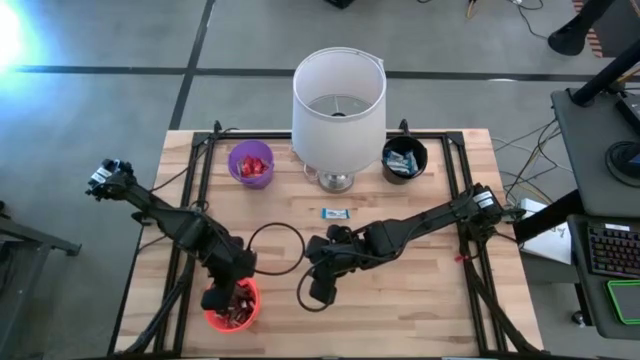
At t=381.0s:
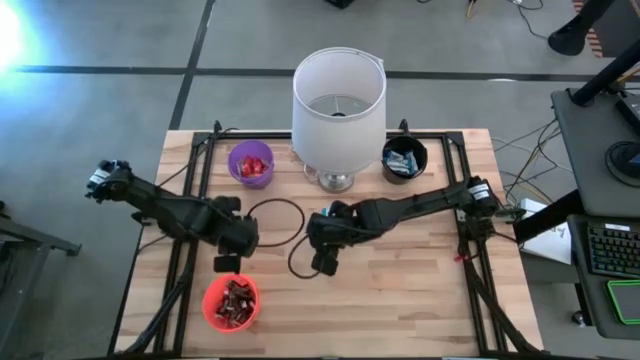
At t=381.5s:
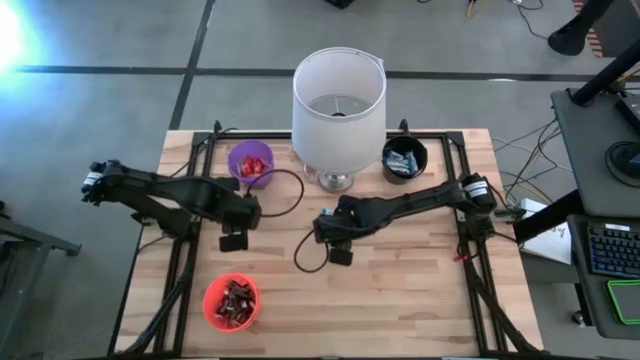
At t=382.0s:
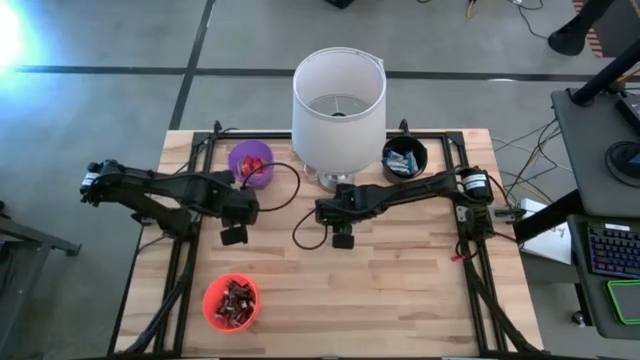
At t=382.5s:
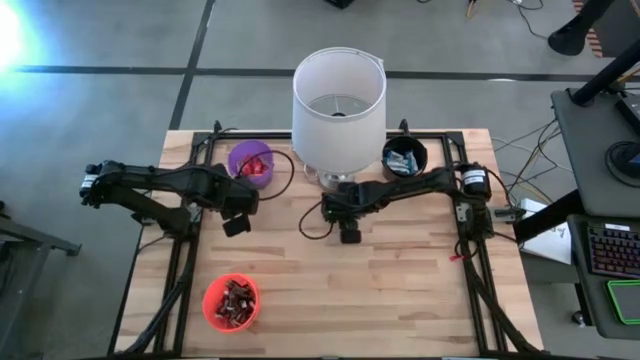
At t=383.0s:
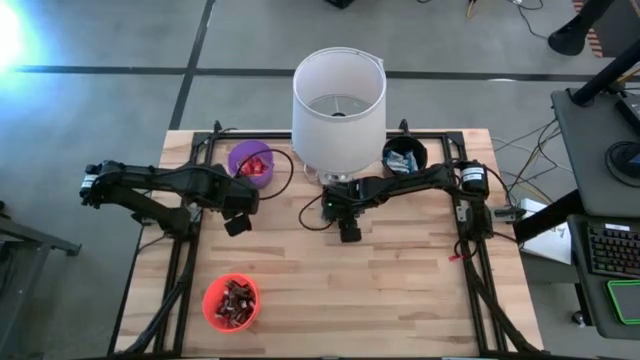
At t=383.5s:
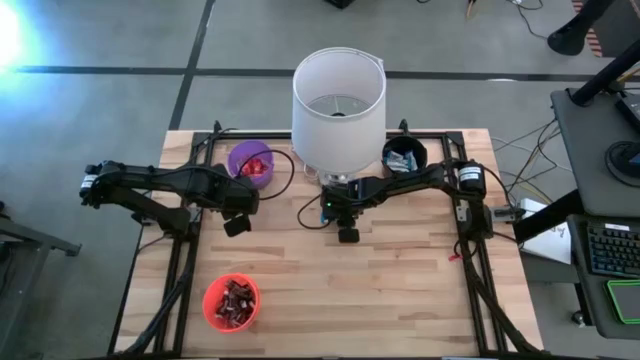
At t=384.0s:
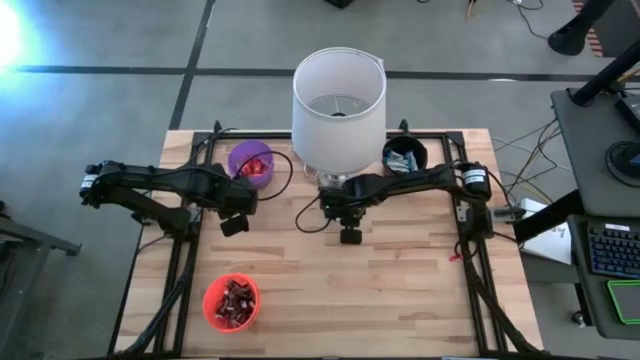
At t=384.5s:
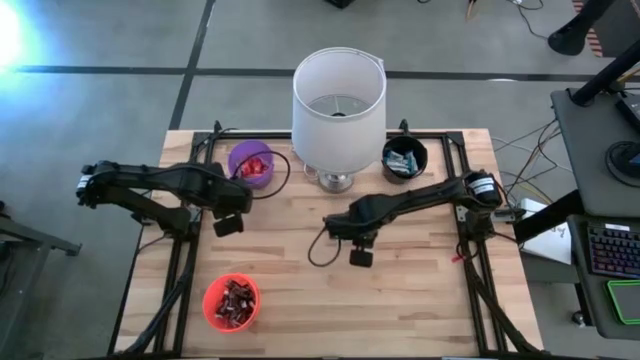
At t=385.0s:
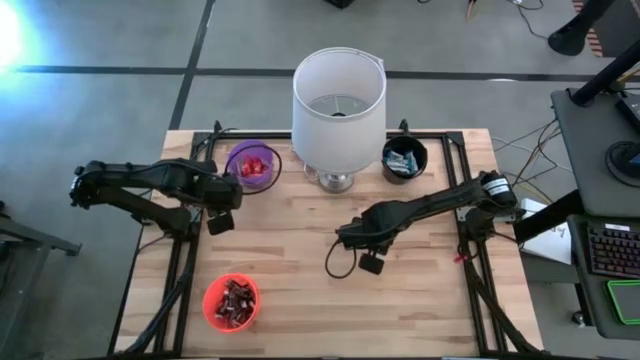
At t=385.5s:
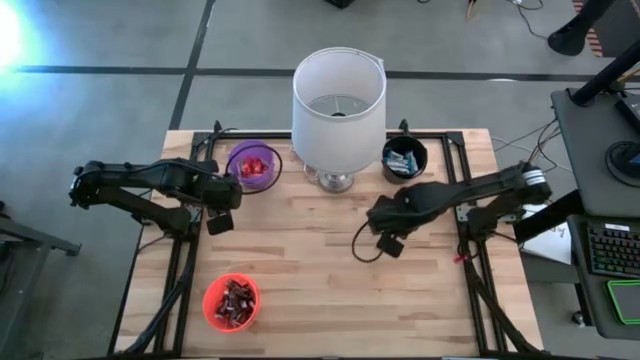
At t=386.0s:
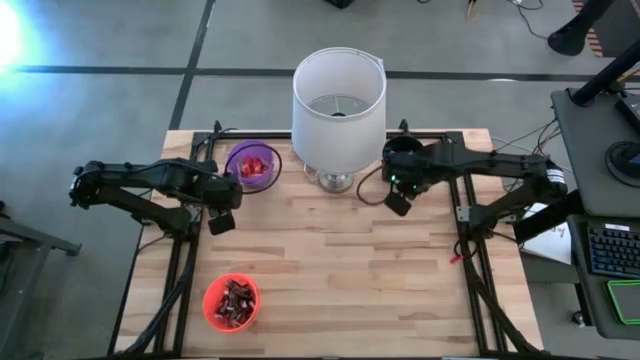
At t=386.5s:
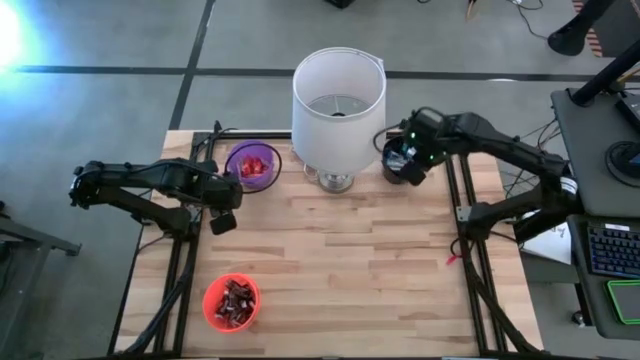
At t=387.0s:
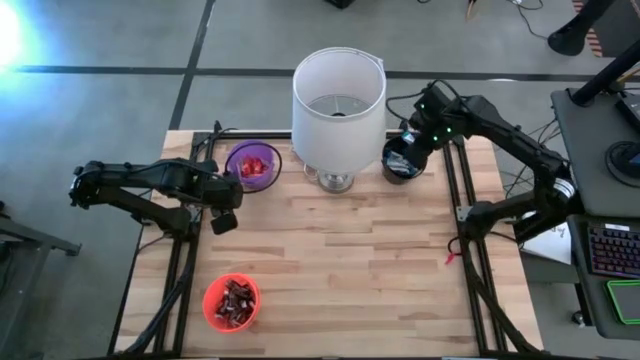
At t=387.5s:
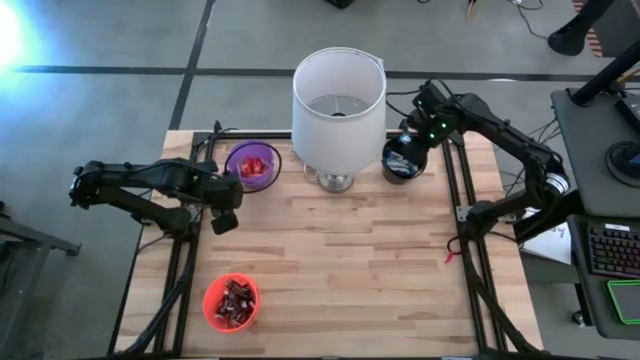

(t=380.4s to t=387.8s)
Task: Sort candy
Put the white chocolate into the black bin

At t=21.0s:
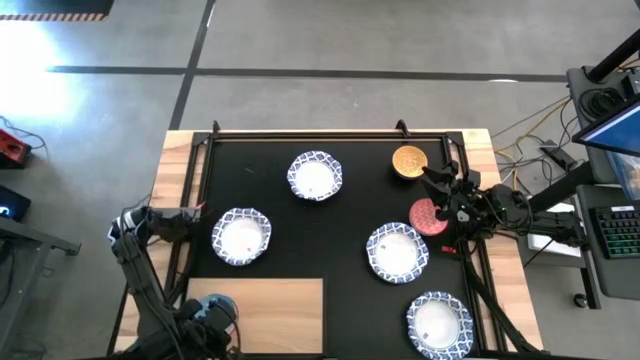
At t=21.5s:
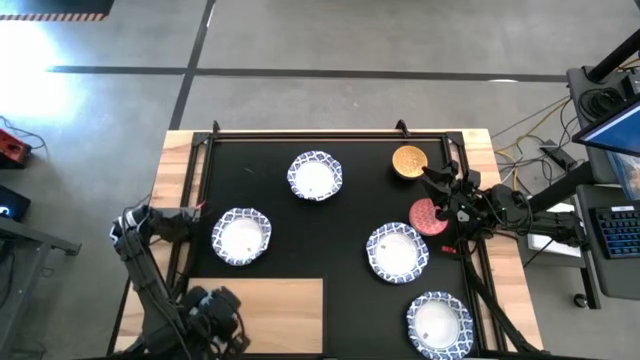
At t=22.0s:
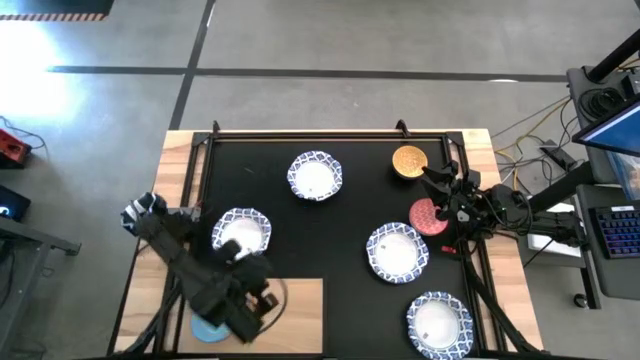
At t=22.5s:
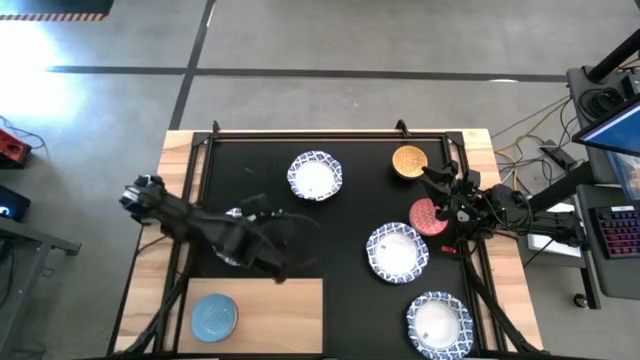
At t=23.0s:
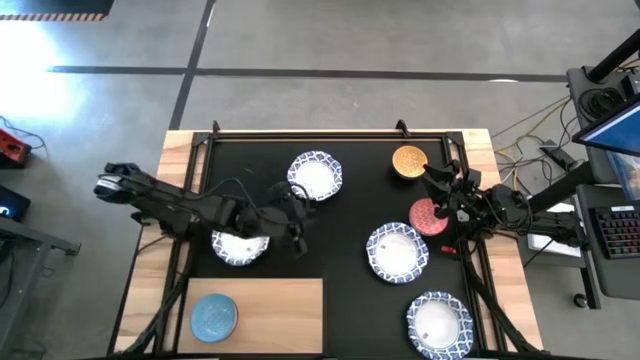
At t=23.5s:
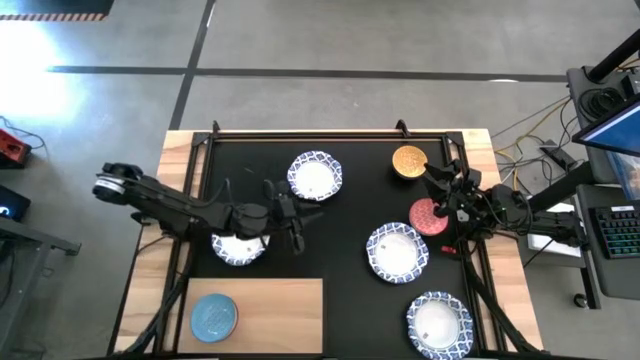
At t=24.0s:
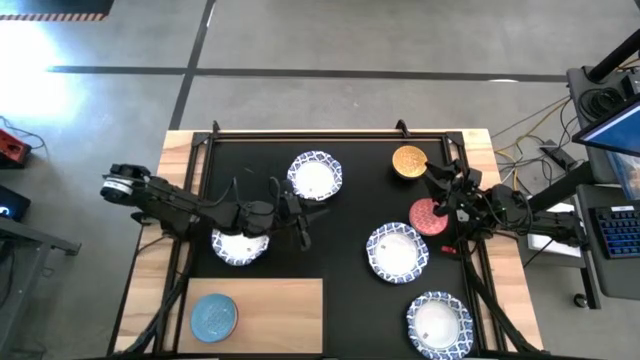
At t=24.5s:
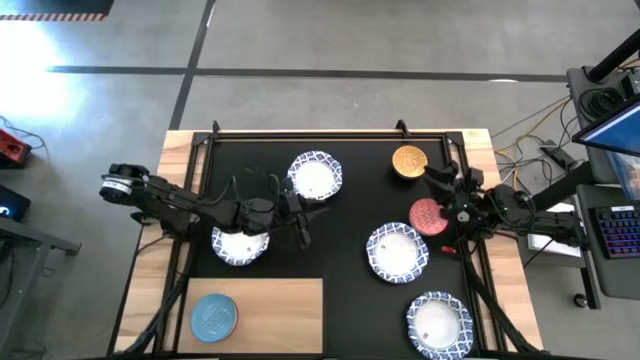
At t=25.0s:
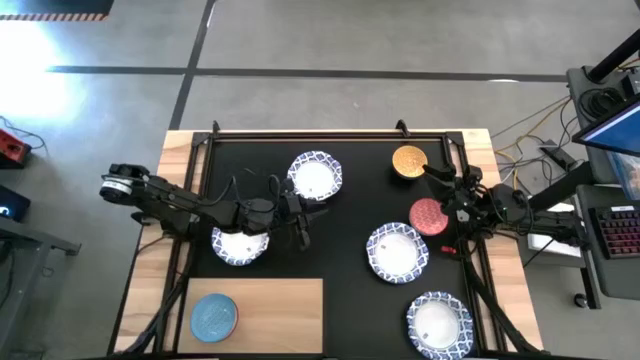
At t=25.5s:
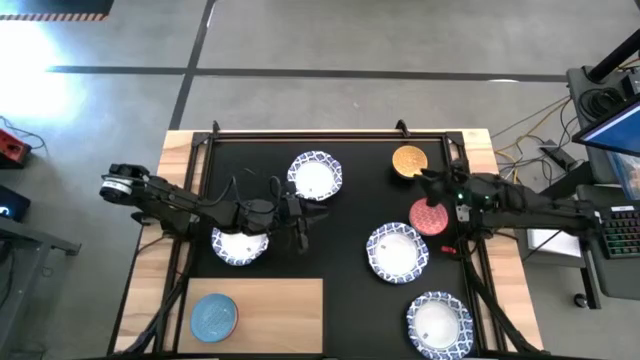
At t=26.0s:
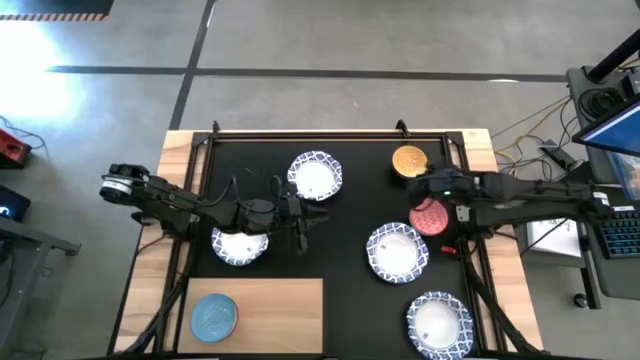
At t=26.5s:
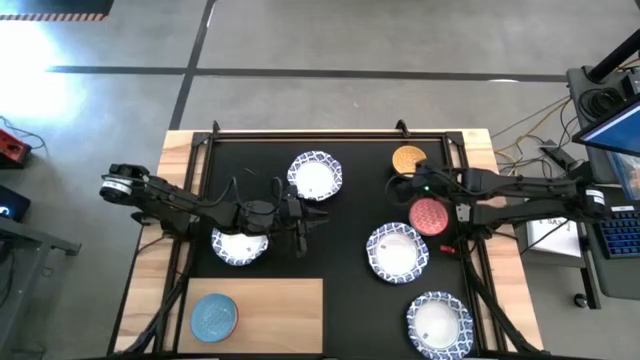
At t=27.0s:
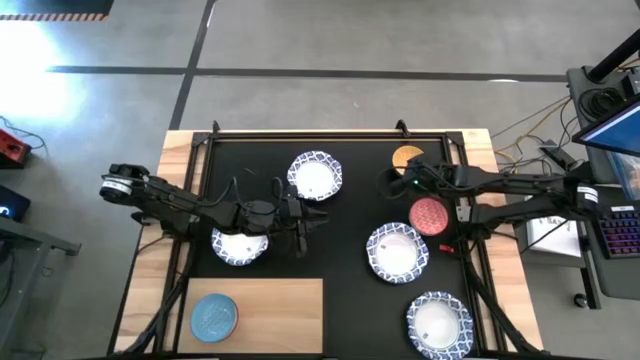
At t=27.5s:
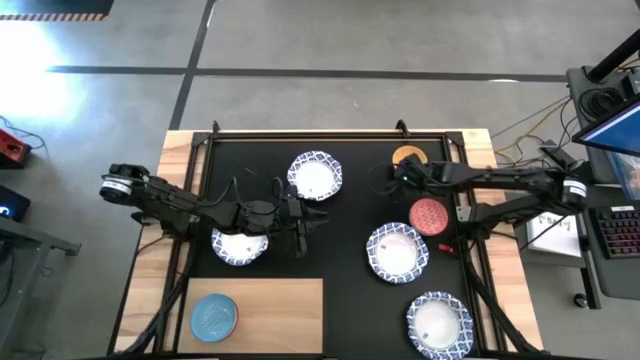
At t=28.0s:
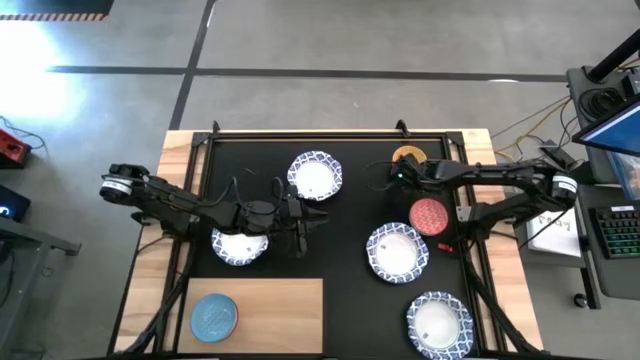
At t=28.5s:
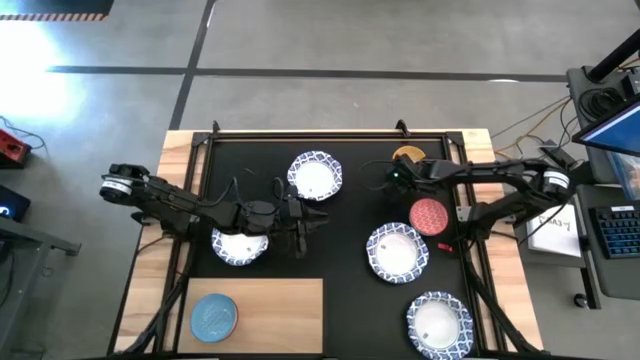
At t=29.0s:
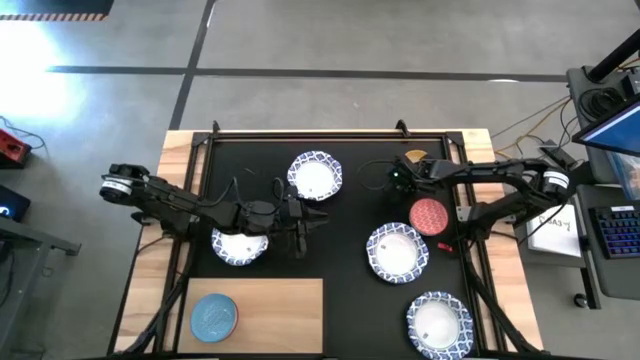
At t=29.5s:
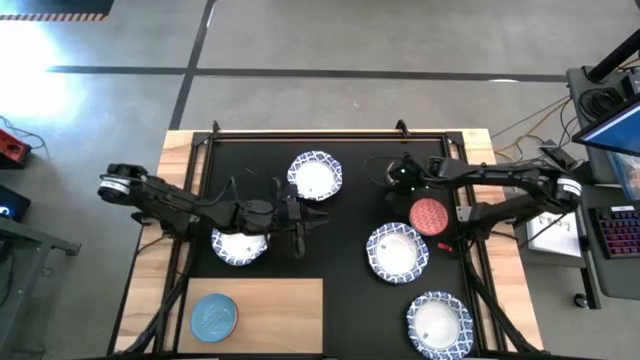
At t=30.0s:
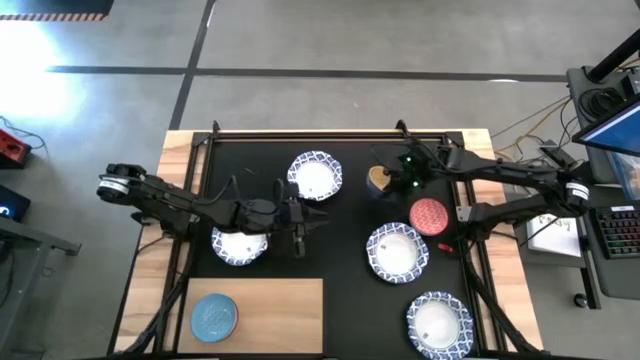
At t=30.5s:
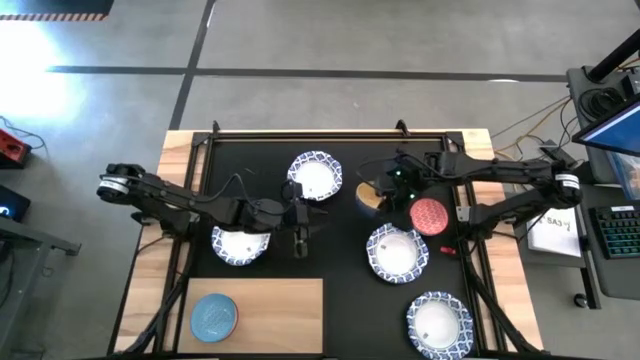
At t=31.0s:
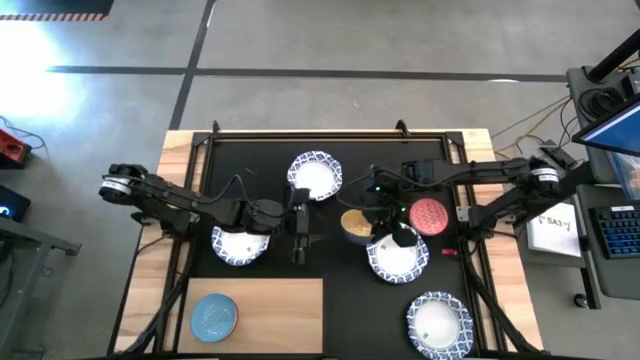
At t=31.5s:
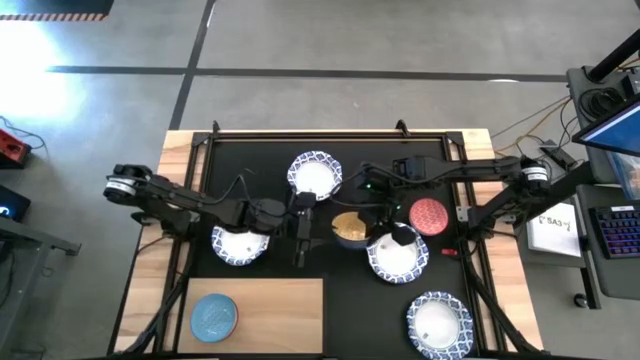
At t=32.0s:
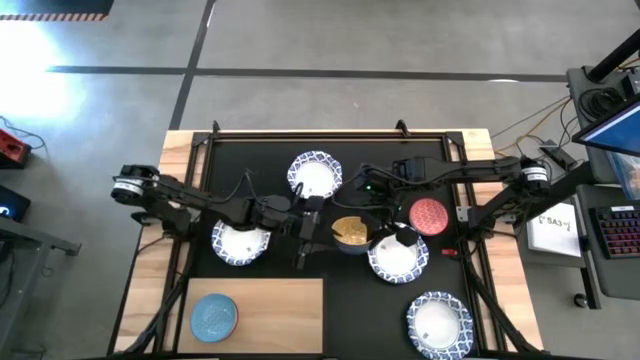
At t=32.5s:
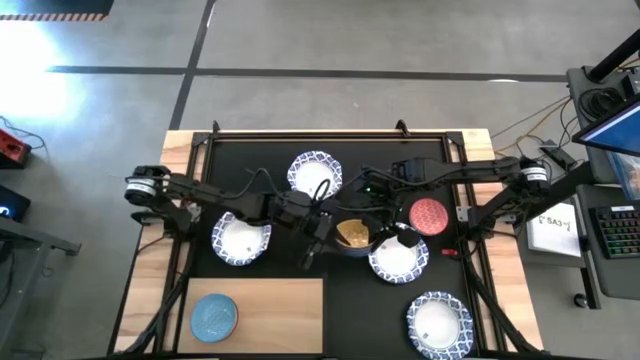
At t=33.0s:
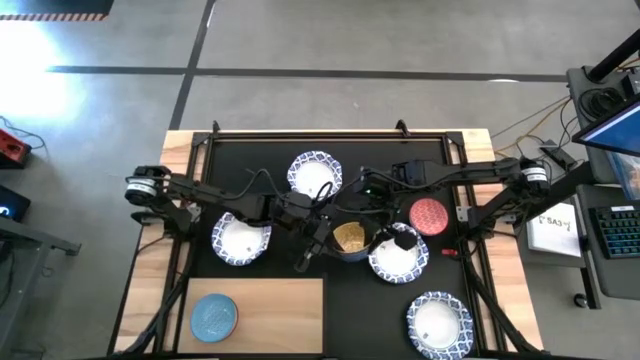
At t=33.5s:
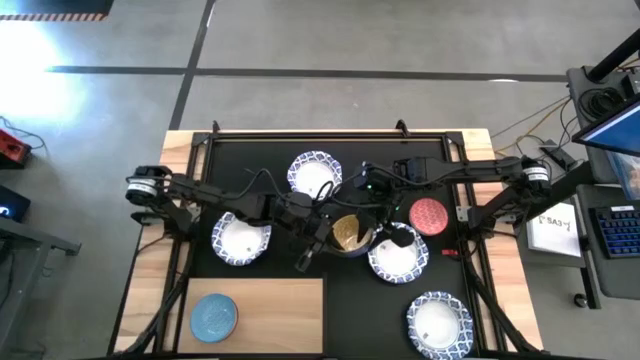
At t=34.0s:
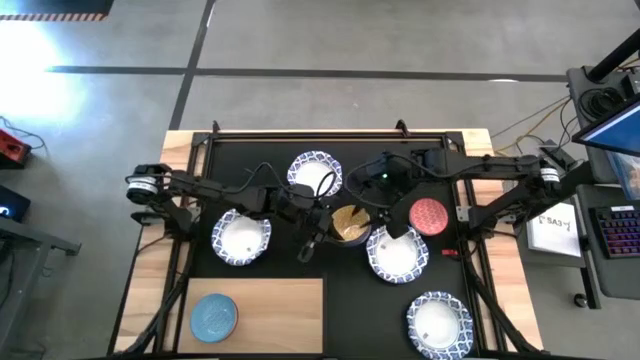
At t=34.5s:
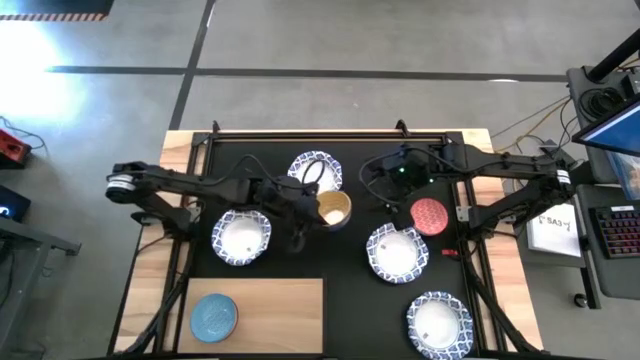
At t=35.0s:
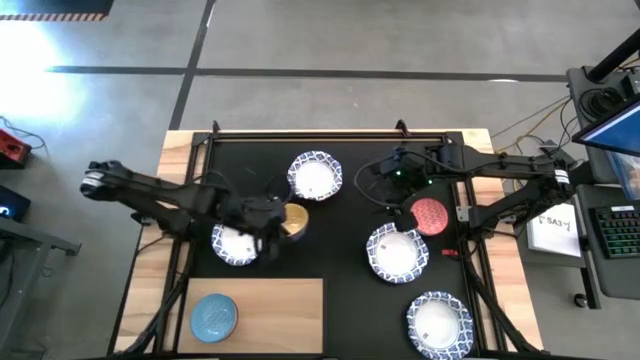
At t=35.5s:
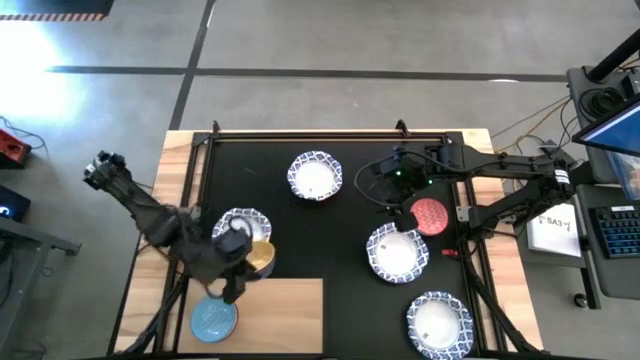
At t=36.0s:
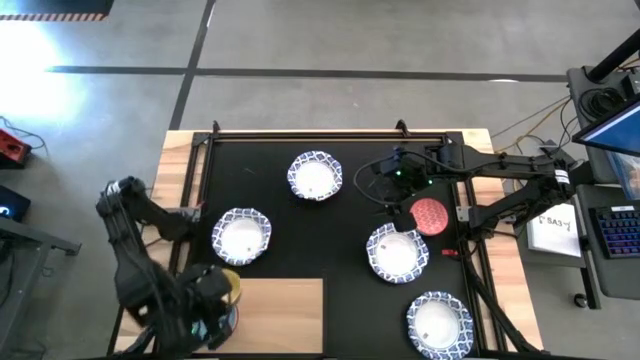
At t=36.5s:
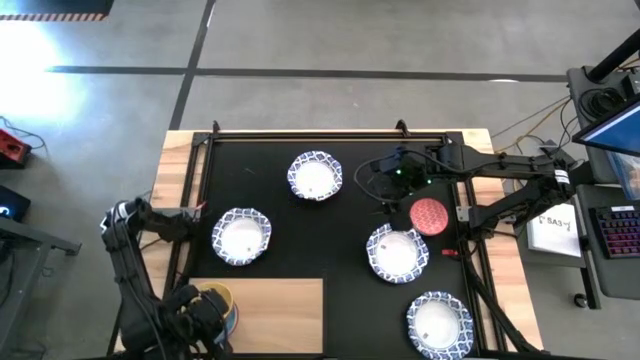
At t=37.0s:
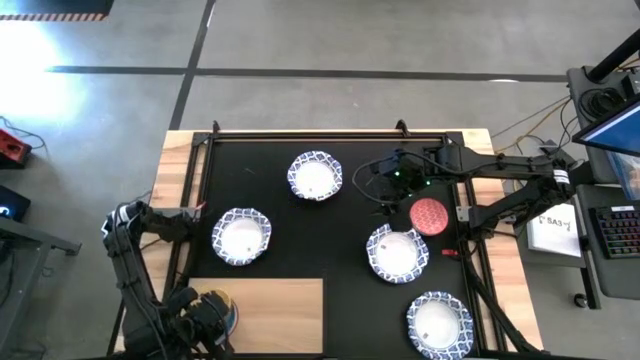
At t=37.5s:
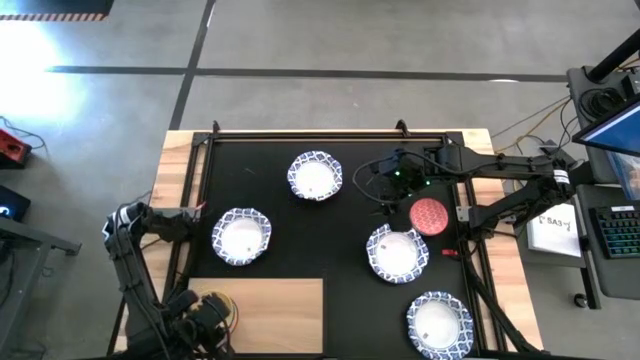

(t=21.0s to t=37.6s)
Task: Place and stack bowls onto a shelf
Stack the yellow bowl on top of the light blue bowl on the shelf
